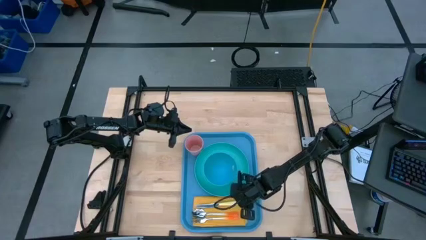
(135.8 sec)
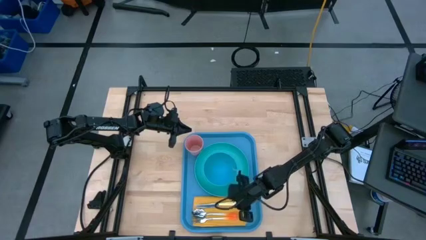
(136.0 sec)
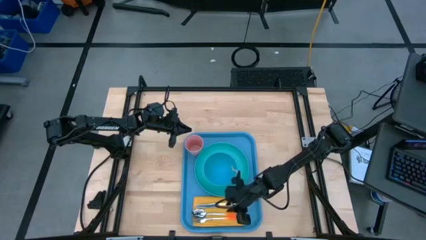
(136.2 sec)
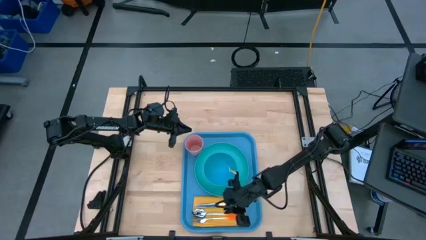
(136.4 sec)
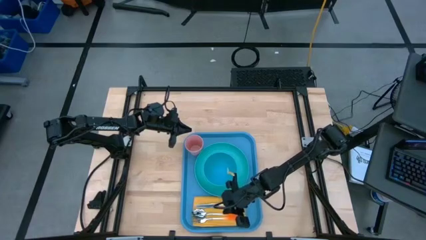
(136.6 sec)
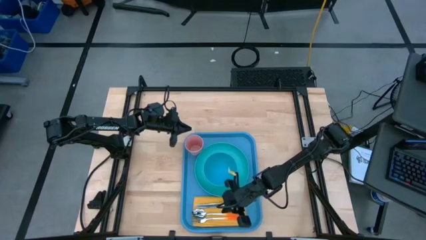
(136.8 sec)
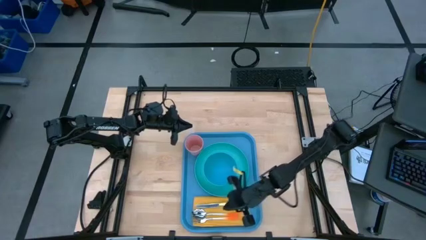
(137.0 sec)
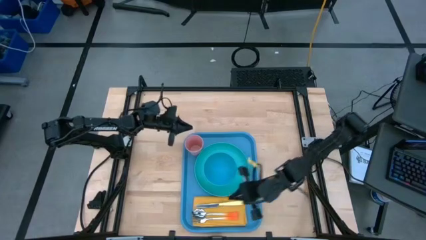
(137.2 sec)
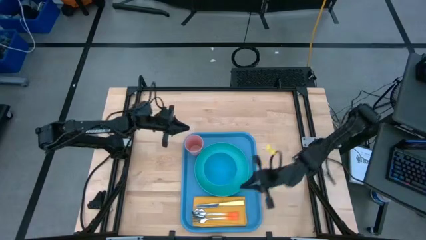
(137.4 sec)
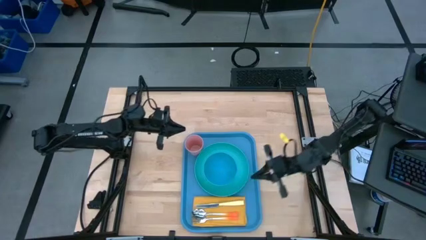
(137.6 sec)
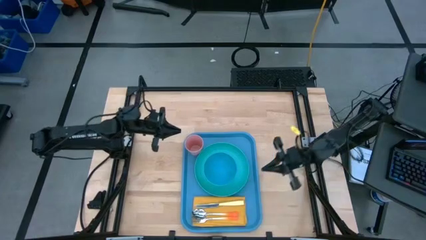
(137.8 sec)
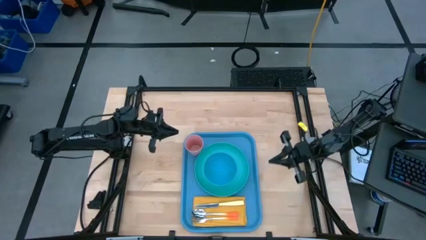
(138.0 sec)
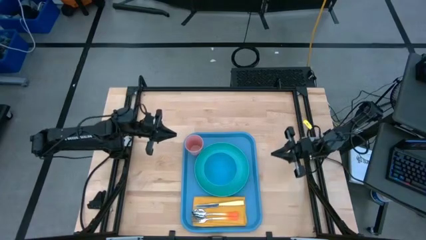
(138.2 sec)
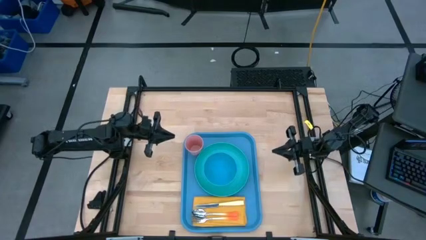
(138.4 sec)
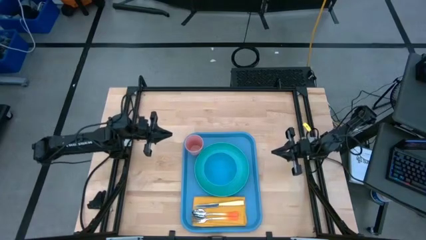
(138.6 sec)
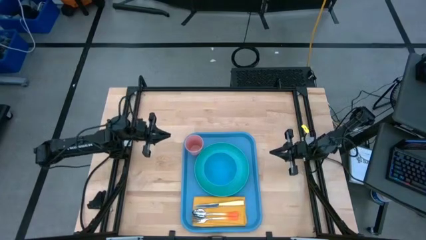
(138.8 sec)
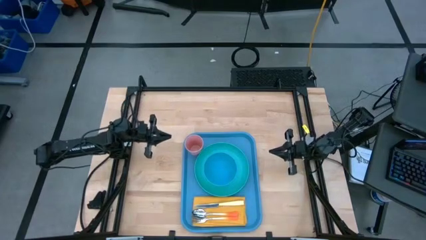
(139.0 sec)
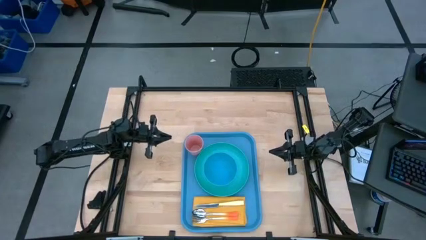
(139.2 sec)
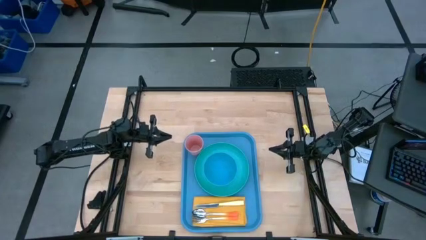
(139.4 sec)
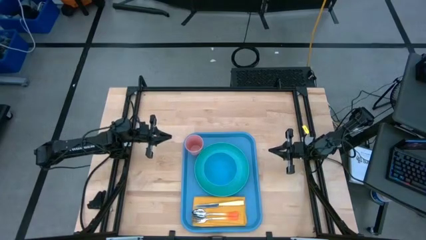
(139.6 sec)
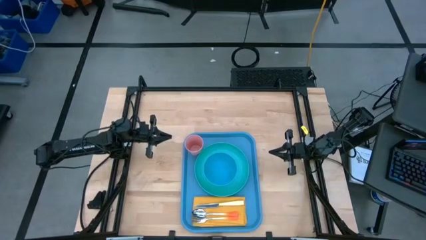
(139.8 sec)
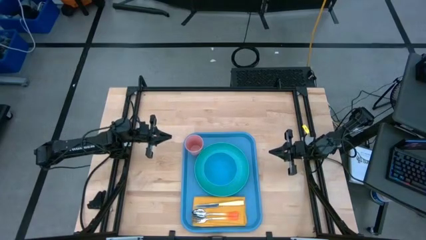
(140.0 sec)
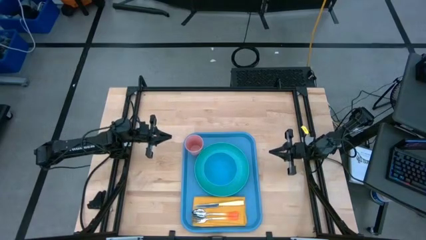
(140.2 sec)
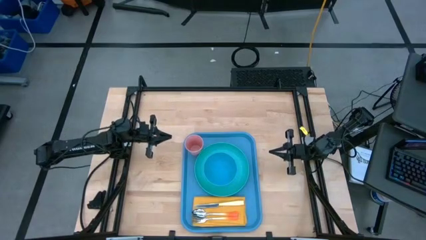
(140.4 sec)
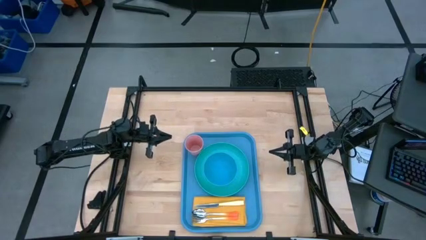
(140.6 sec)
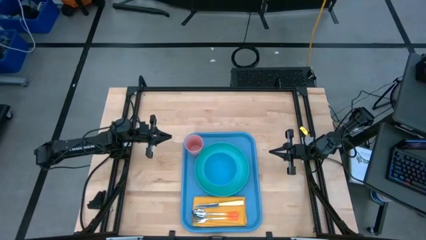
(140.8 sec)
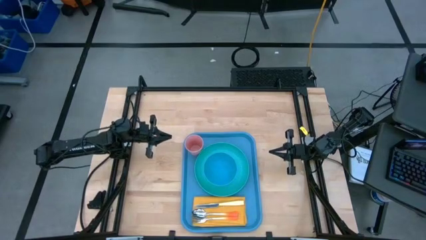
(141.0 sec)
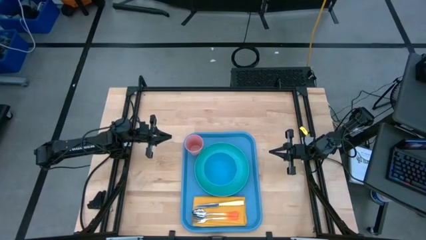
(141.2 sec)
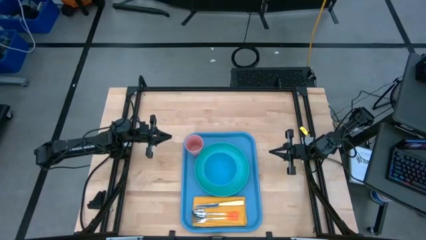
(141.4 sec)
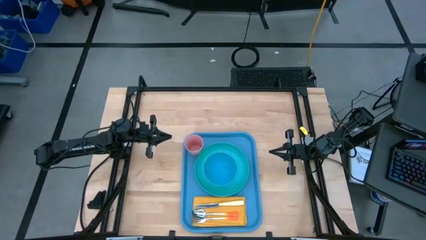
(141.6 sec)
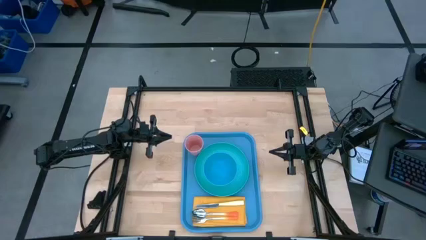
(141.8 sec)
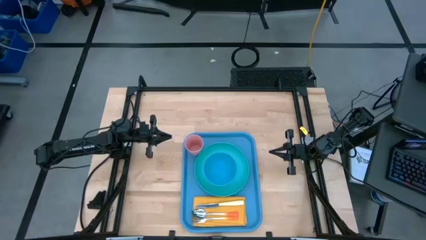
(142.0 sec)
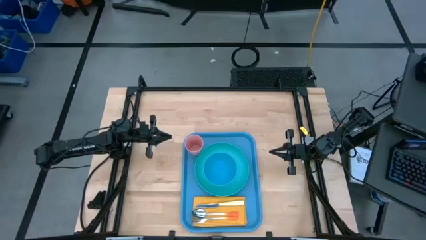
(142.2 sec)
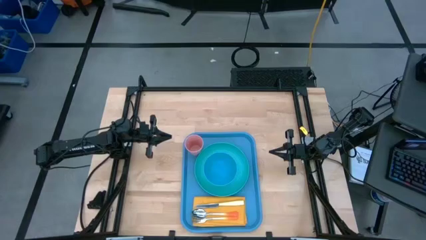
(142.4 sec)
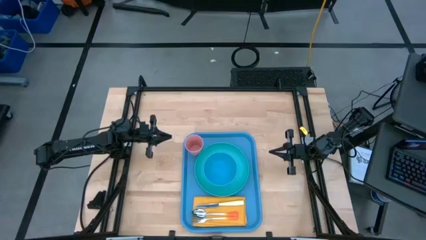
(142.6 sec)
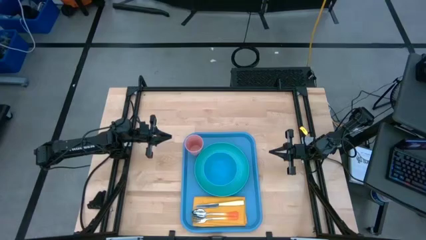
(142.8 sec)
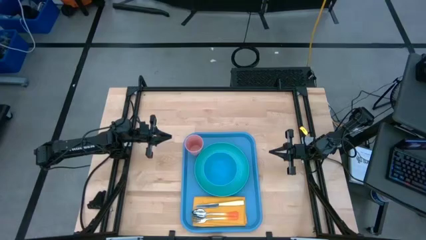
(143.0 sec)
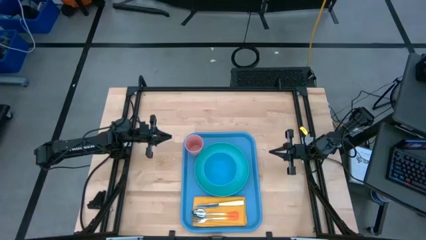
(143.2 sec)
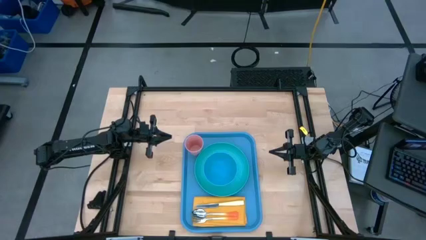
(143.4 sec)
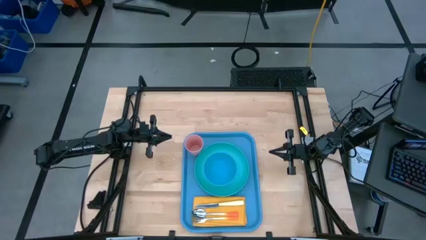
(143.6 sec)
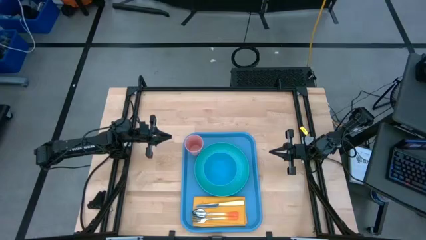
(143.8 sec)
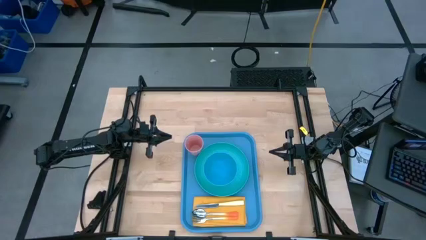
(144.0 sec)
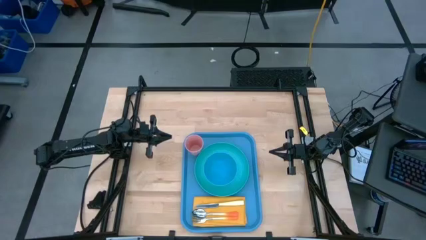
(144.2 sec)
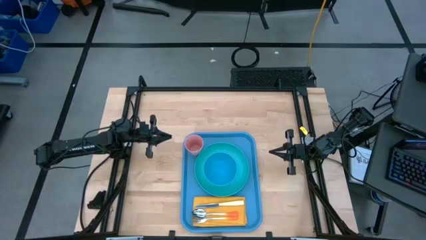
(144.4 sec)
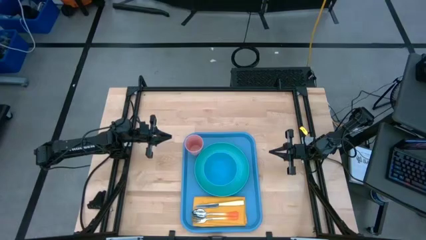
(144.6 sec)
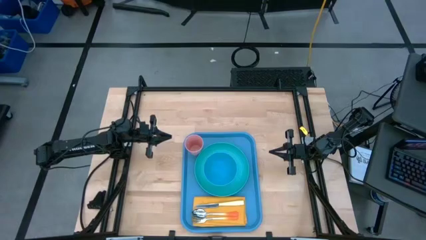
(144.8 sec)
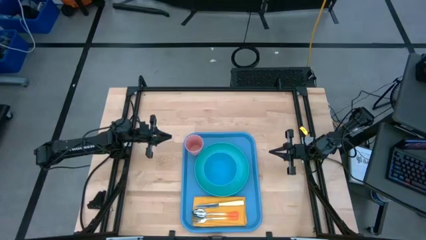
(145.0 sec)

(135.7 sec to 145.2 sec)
Task: Set up tray
Return to Home Position
